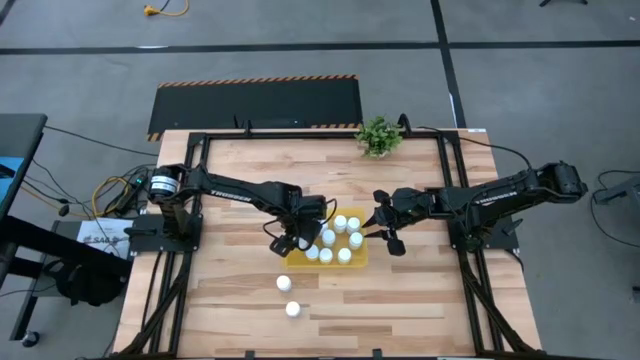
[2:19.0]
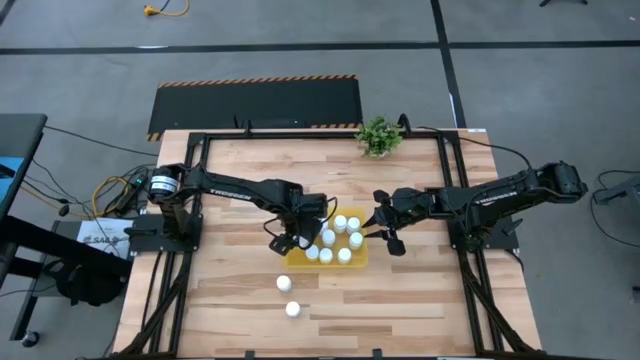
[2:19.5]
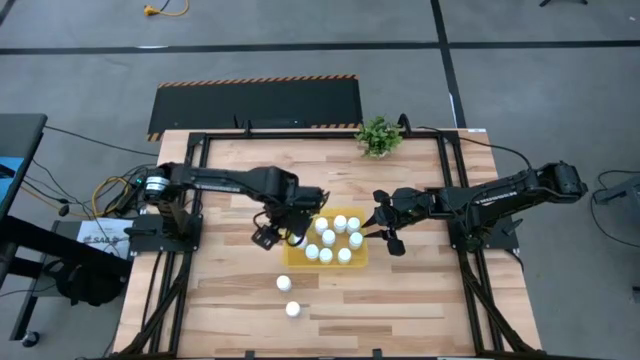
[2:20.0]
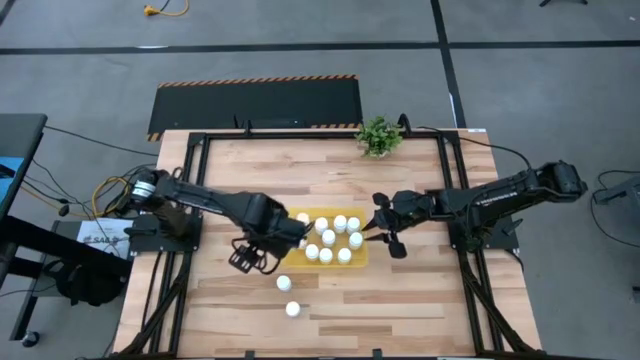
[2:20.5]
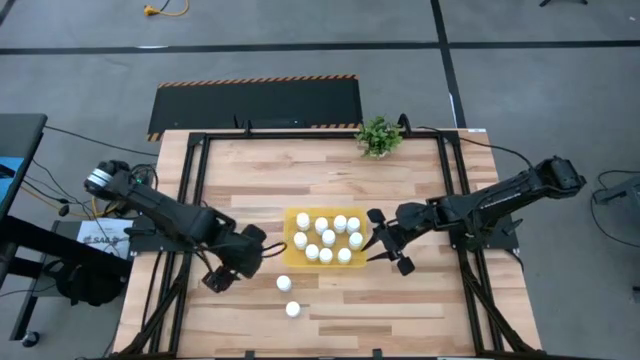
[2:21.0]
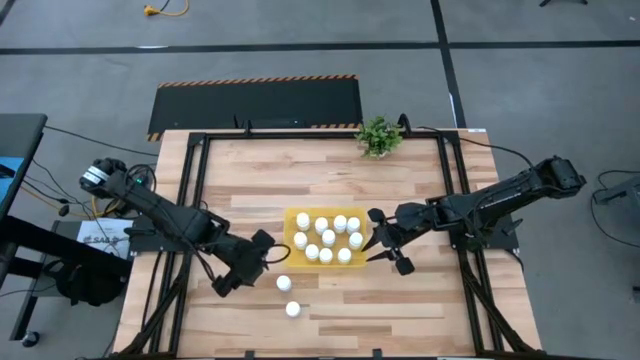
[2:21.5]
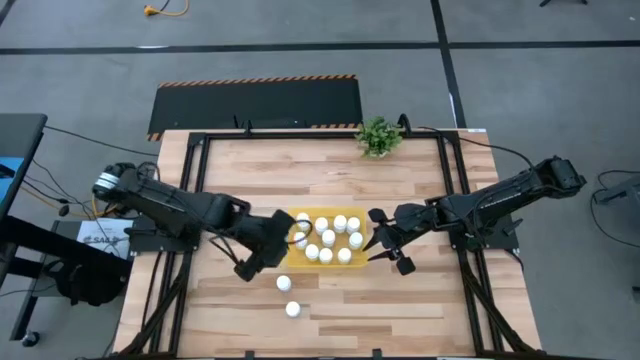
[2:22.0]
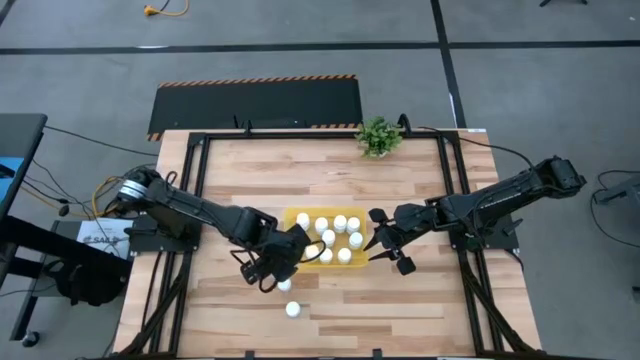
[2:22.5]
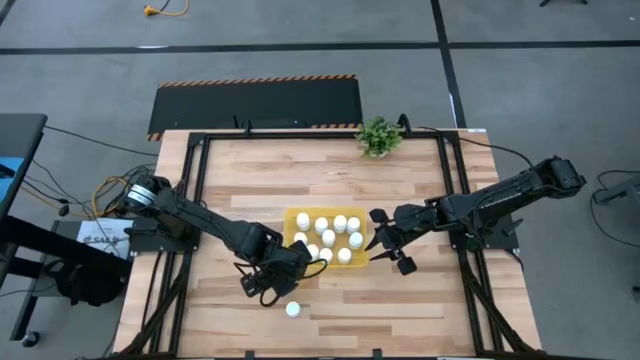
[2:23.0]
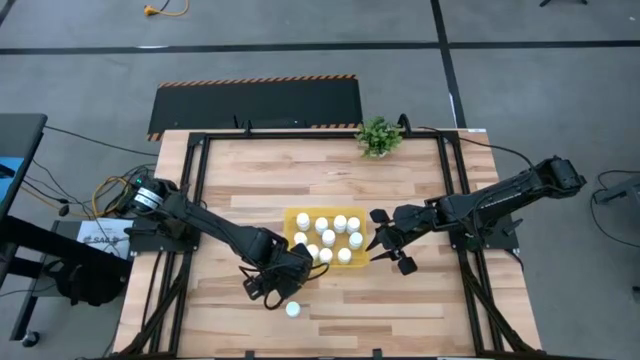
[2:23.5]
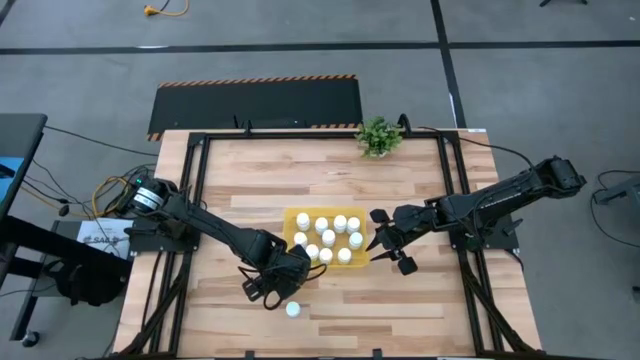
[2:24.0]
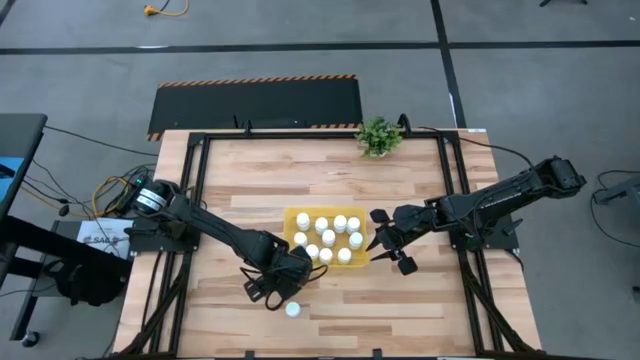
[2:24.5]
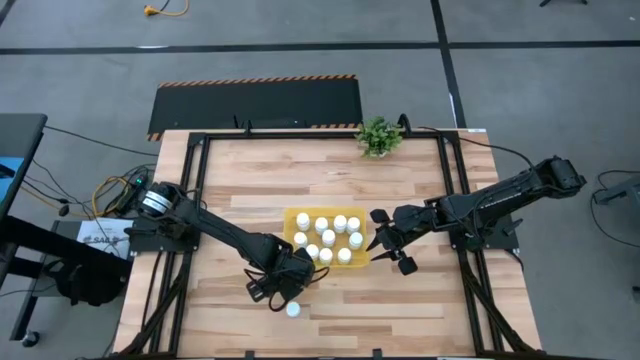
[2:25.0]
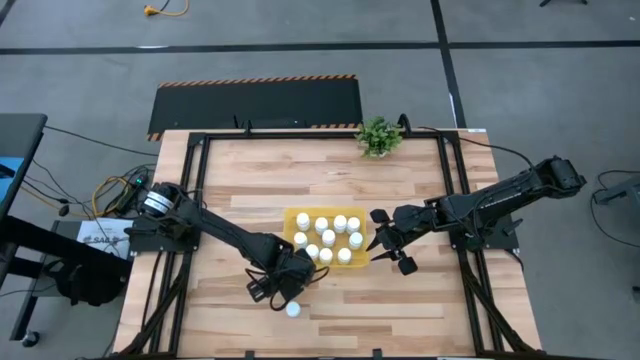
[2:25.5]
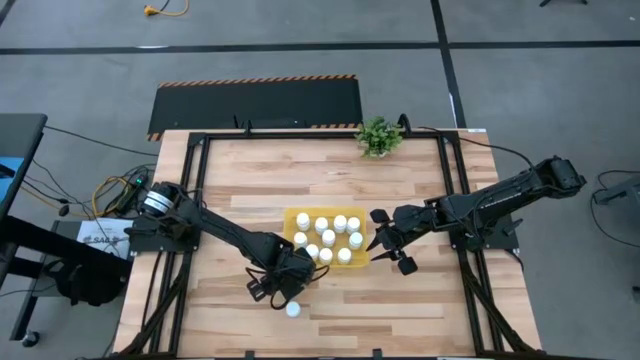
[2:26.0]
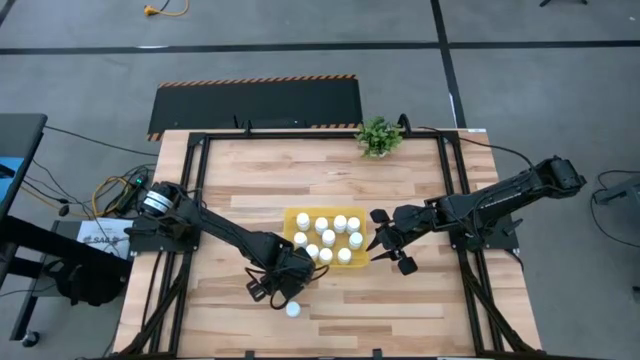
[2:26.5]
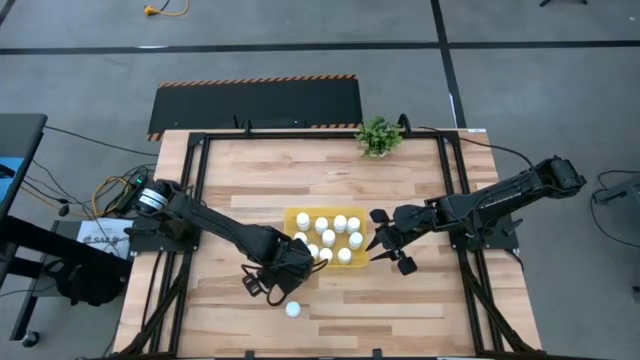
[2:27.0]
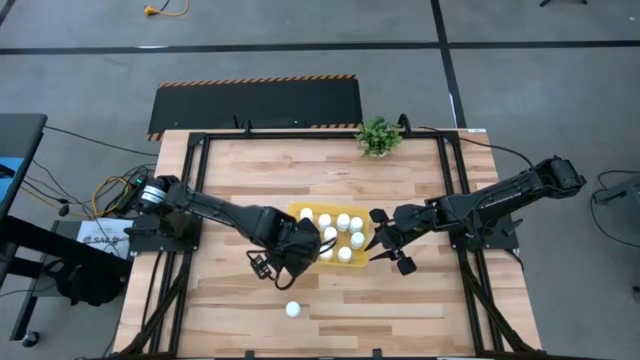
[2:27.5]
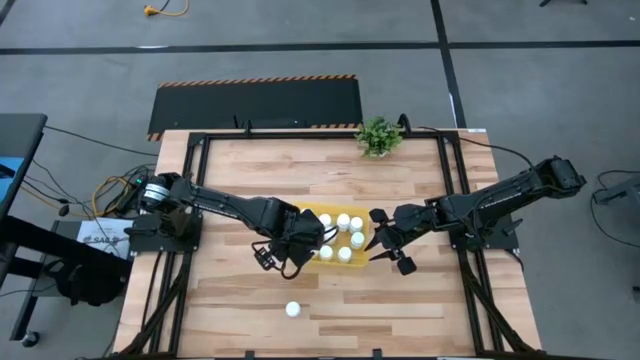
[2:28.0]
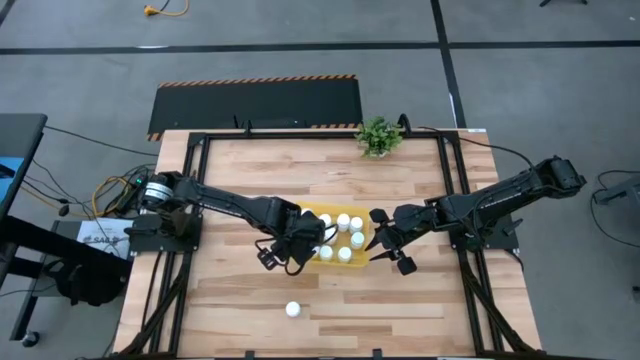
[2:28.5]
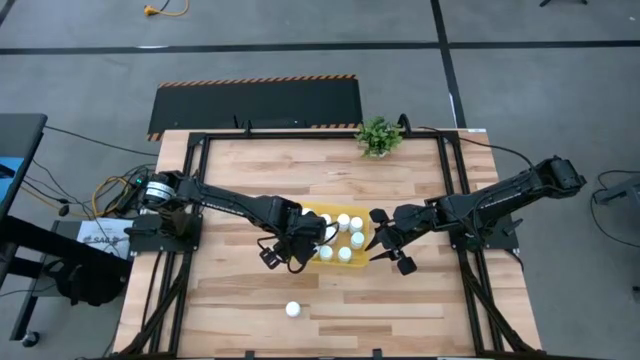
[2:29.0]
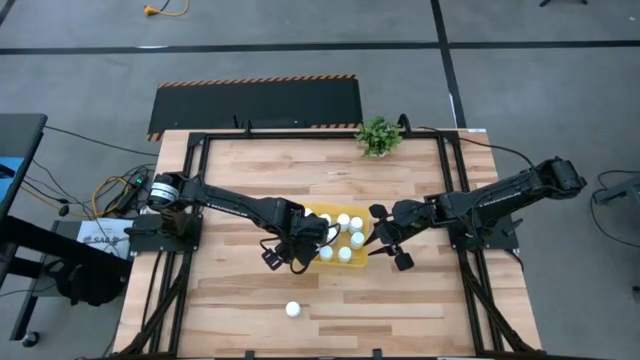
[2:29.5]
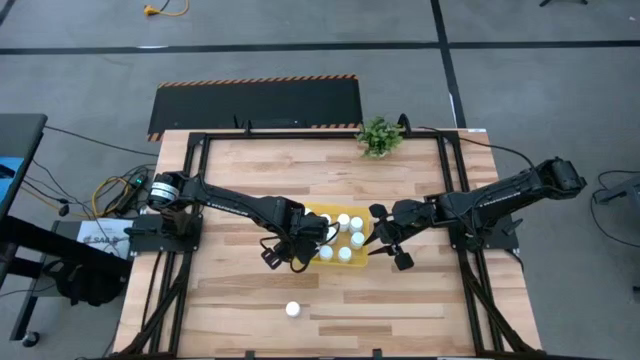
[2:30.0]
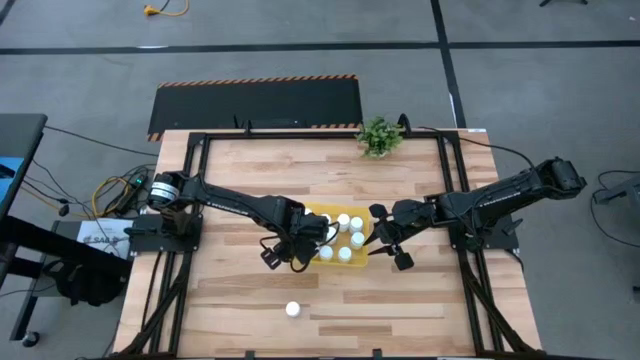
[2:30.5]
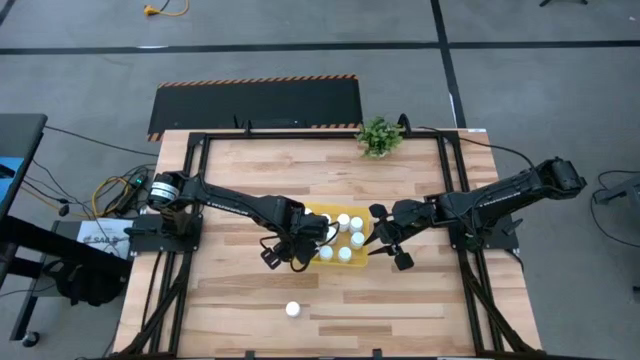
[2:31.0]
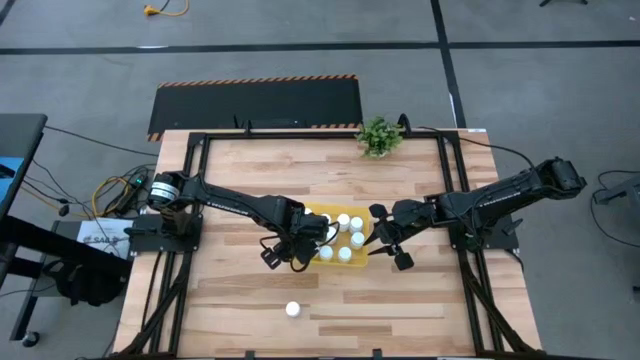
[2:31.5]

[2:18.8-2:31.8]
Task: Pick and place pill bottles into a basket
Put the white pill bottle into the yellow bin

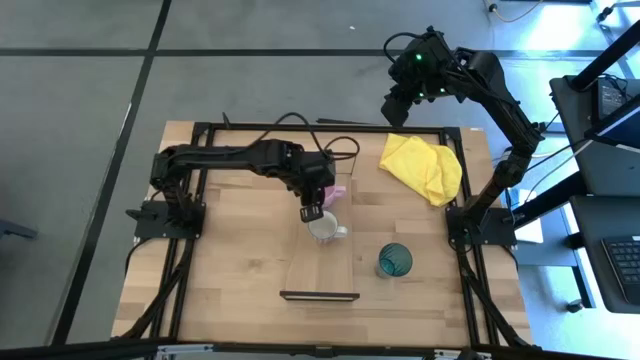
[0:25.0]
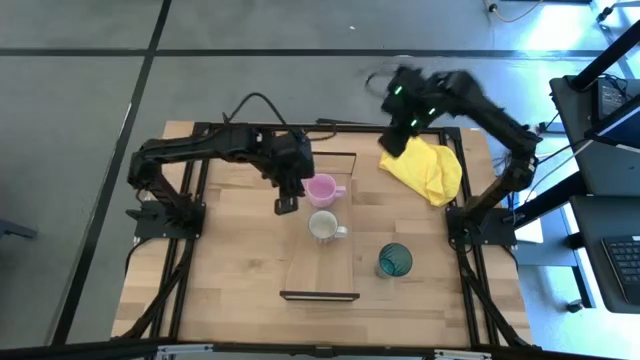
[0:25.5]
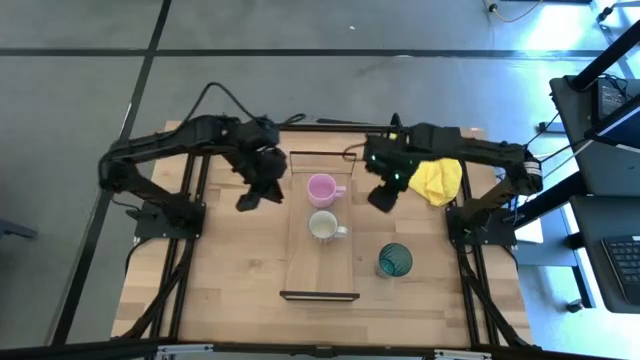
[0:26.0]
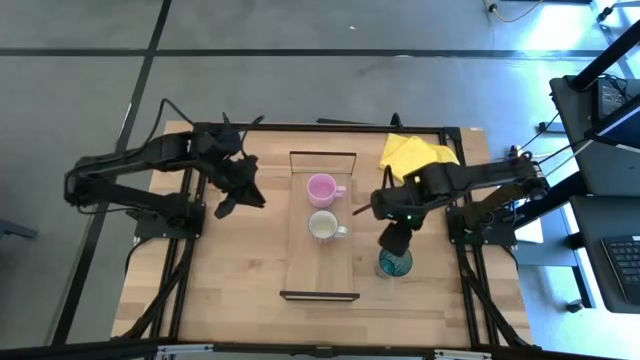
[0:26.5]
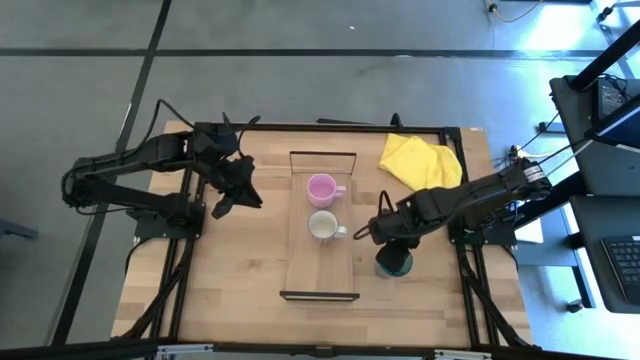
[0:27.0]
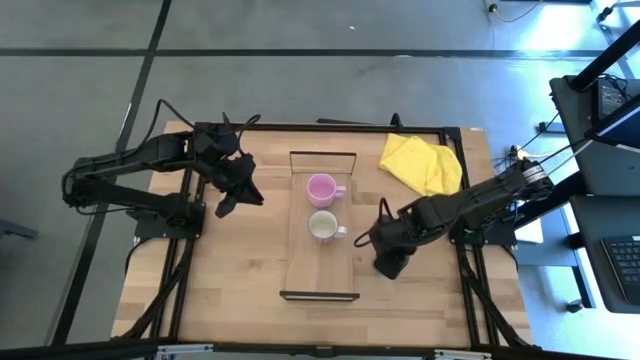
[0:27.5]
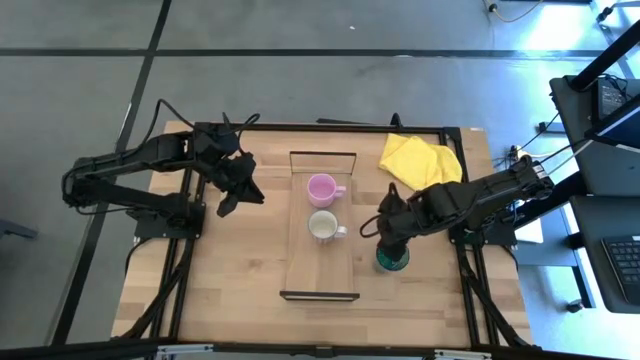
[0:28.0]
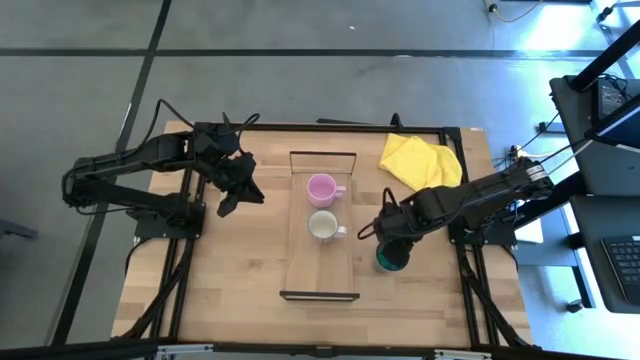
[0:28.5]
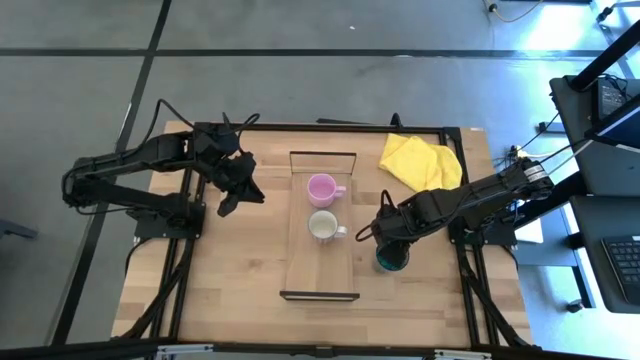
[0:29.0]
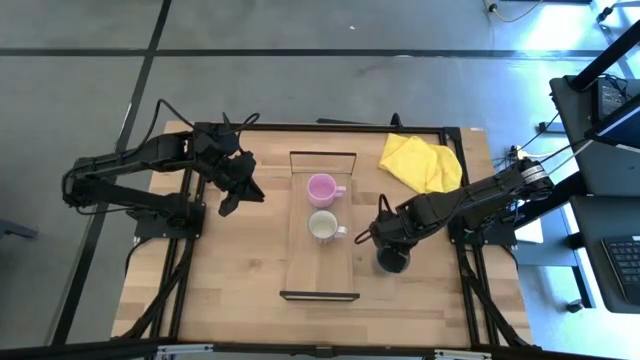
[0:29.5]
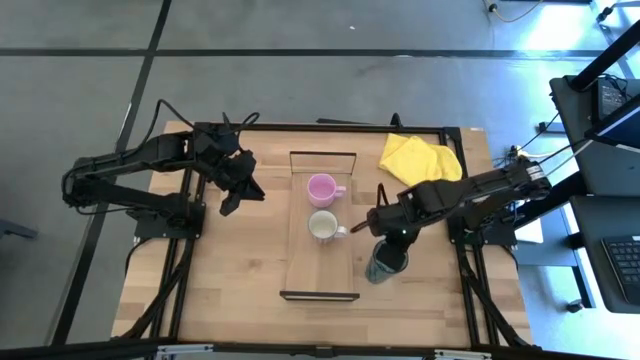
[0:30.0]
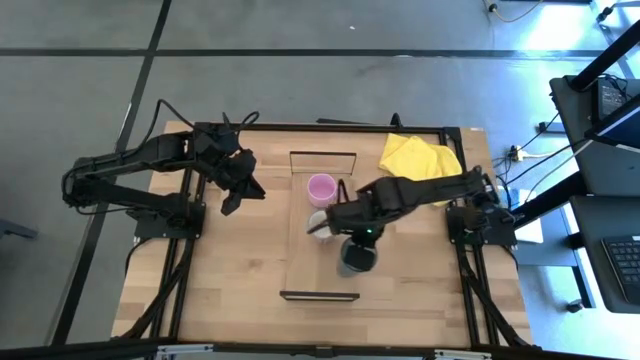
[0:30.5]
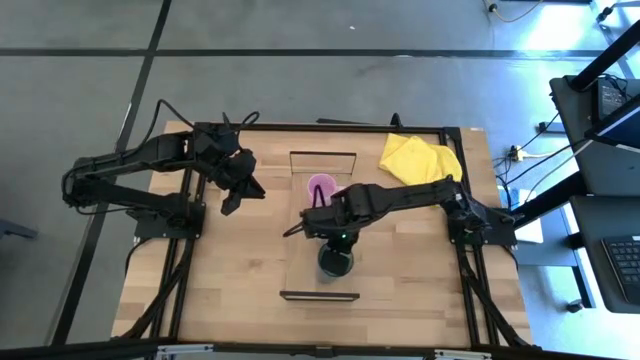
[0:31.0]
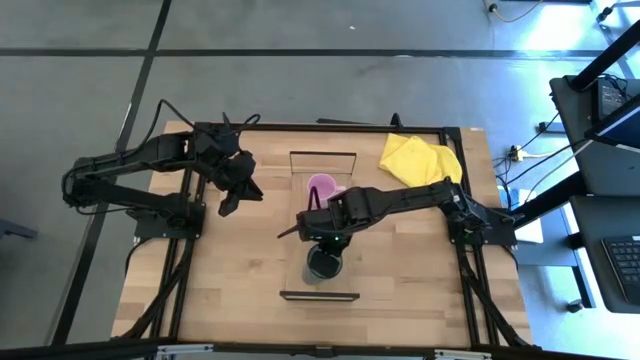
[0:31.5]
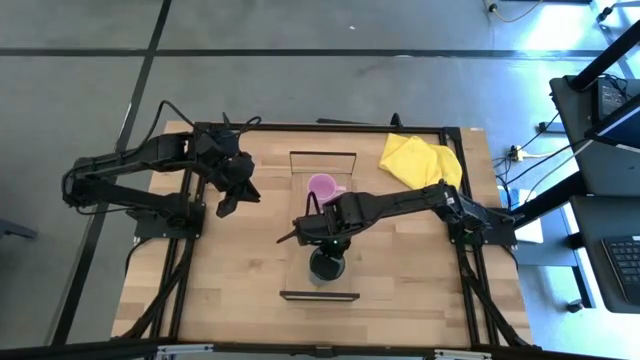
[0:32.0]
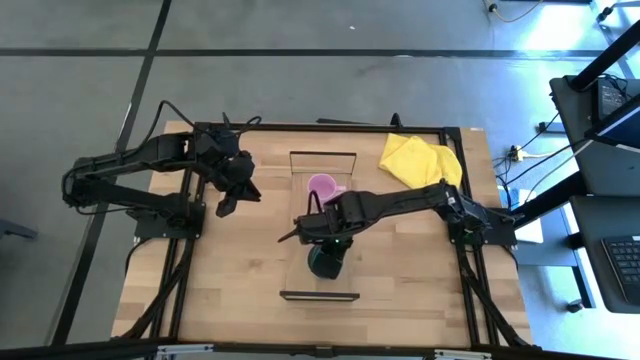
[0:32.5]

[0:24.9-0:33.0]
Task: Stack small to large cups/mugs on shelf
Put the blue cup on the shelf
